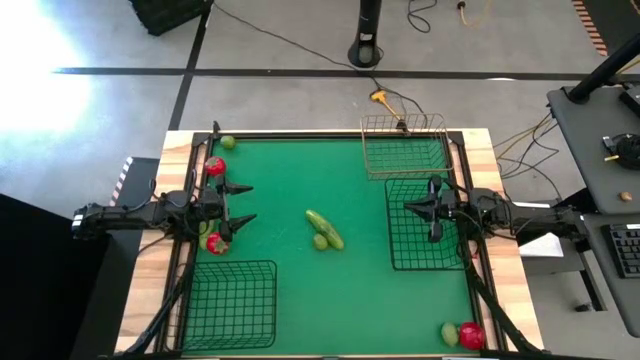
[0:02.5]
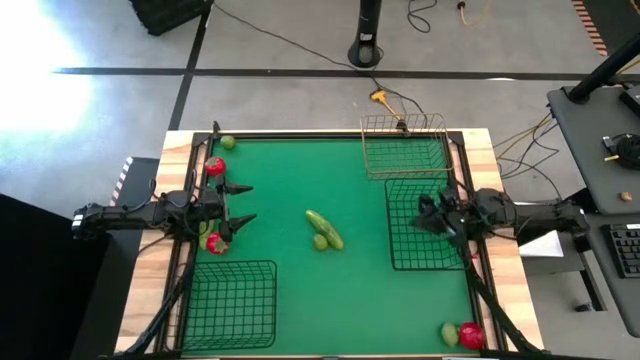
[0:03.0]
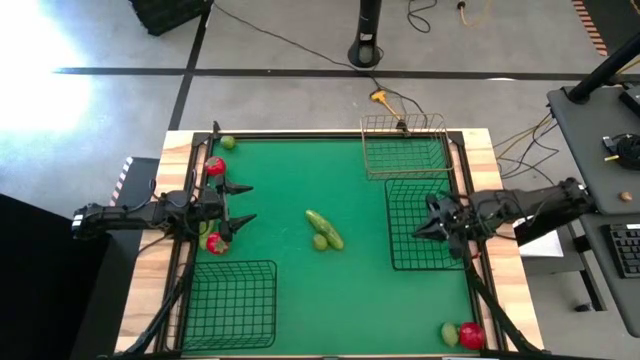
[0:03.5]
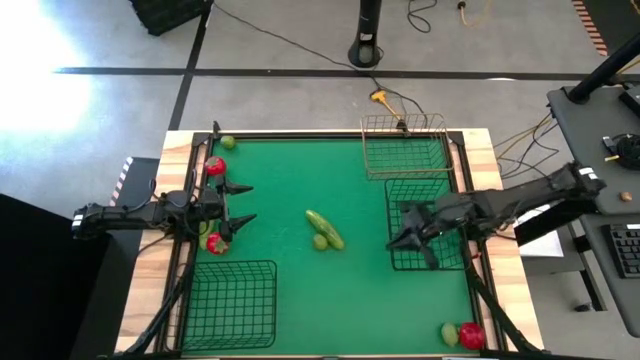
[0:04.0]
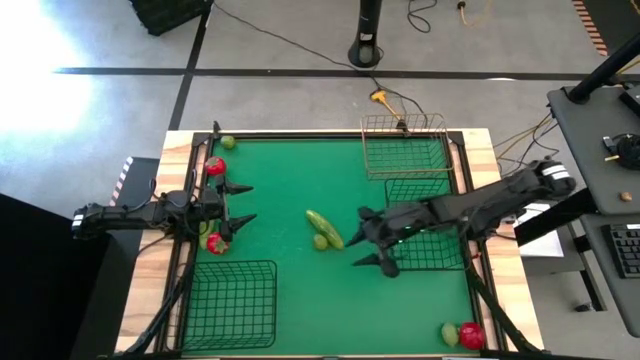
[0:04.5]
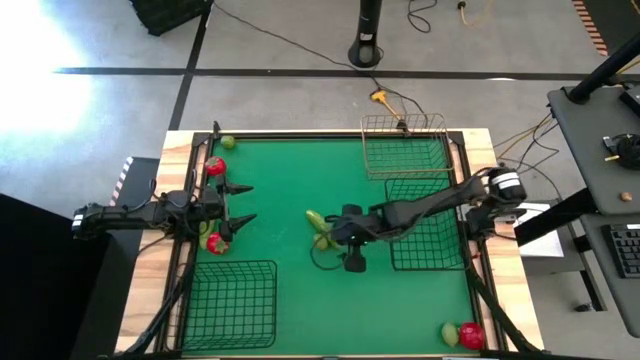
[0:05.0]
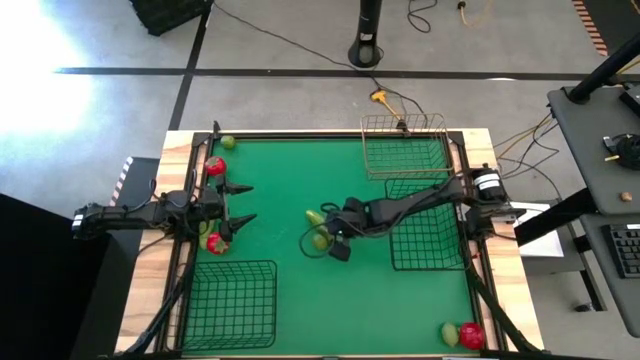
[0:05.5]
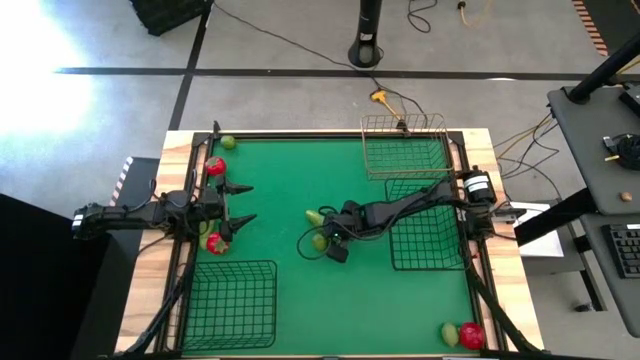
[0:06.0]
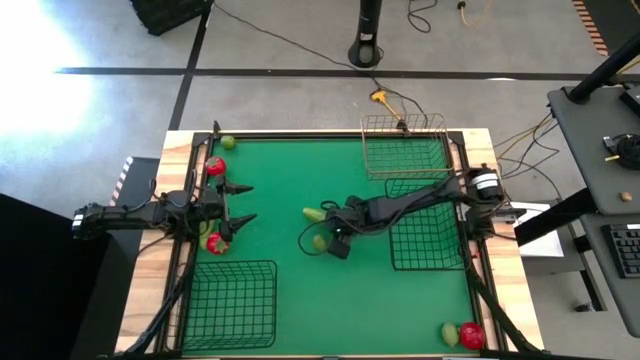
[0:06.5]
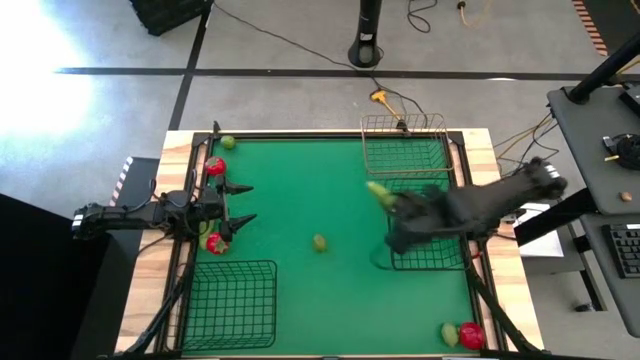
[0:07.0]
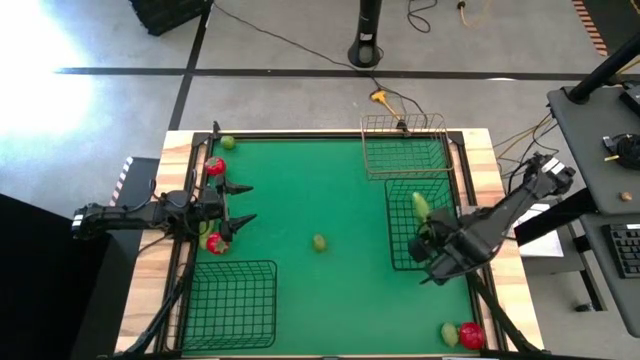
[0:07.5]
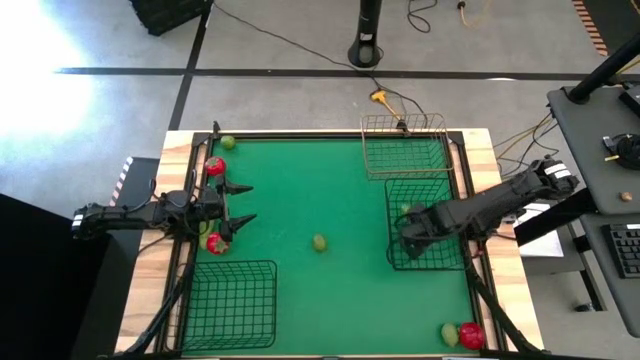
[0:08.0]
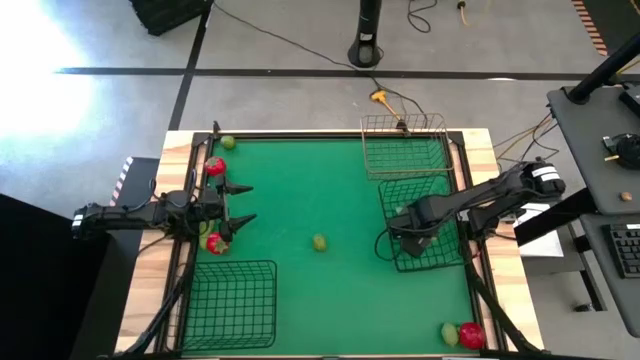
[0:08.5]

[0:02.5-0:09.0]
Task: Sort produce into baskets
Put the right cucumber into the top black wire basket

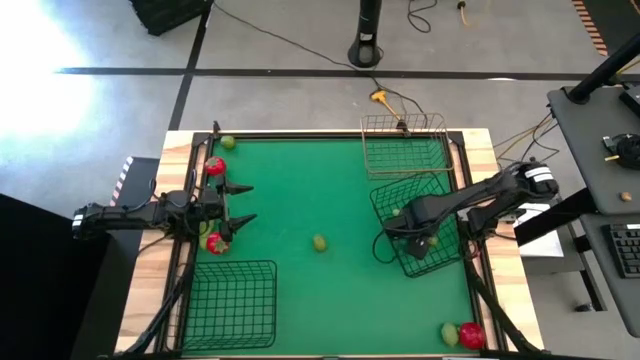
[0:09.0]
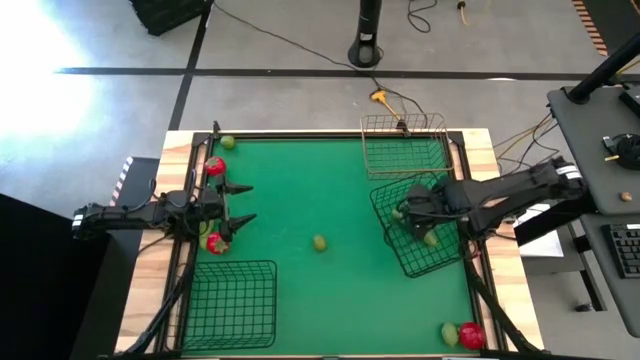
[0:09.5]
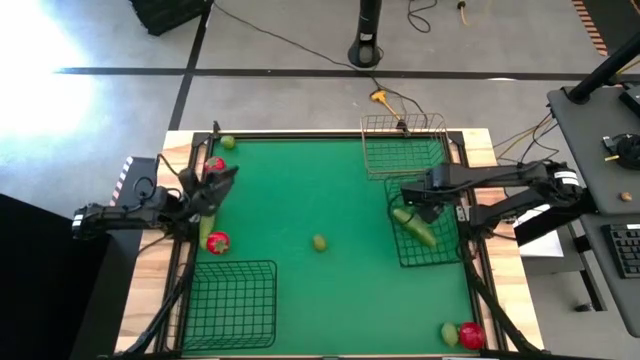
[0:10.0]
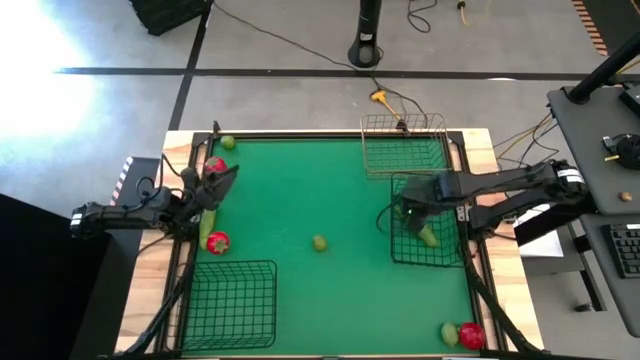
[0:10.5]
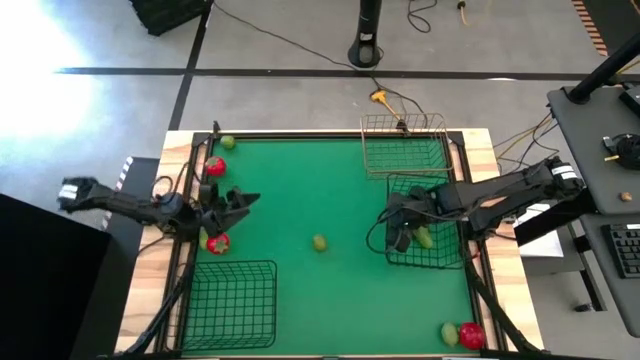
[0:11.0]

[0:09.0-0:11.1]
Adjust the top wire black wire basket

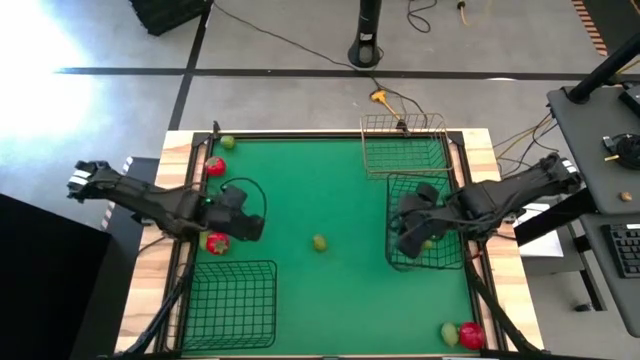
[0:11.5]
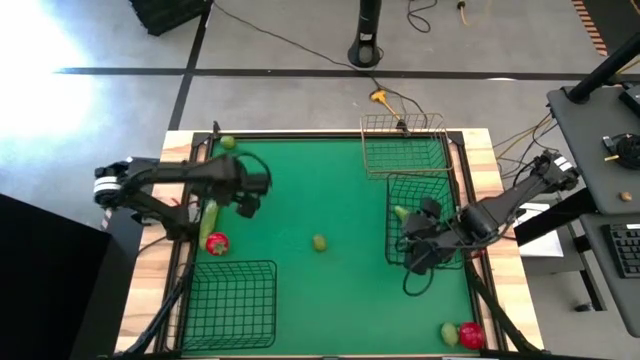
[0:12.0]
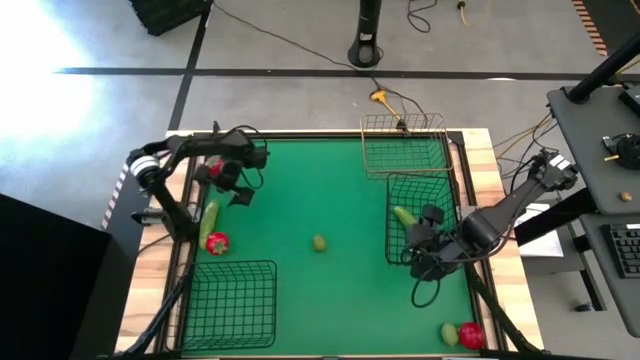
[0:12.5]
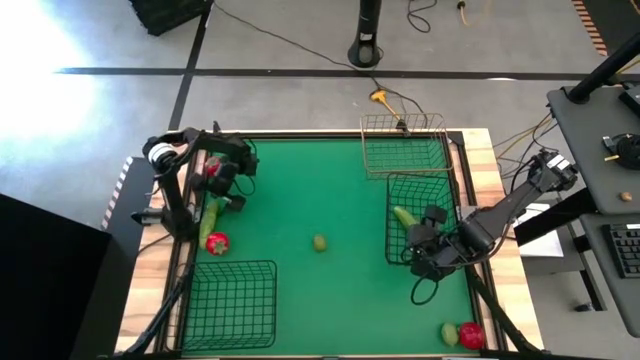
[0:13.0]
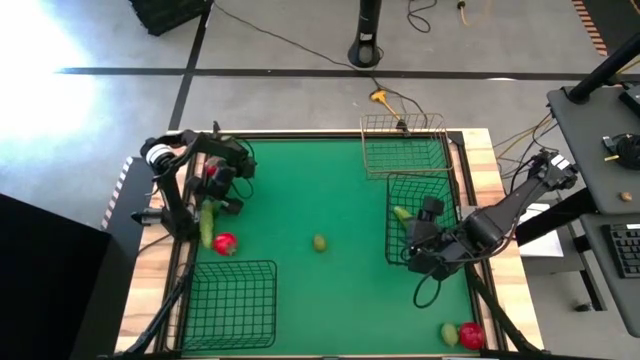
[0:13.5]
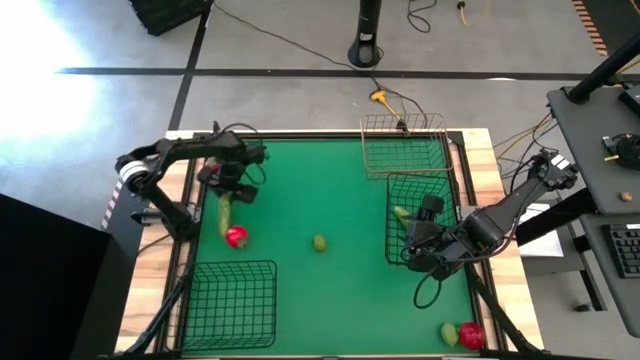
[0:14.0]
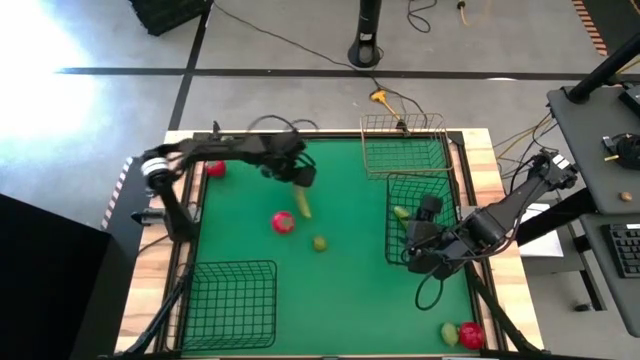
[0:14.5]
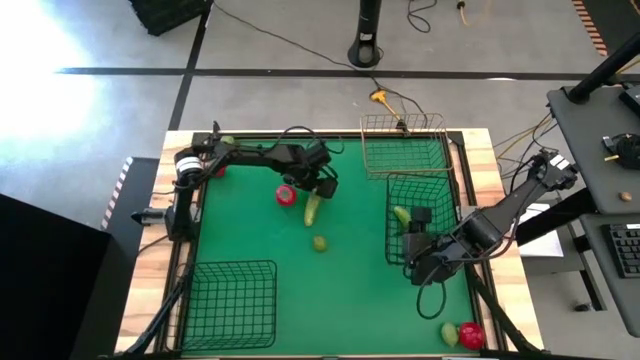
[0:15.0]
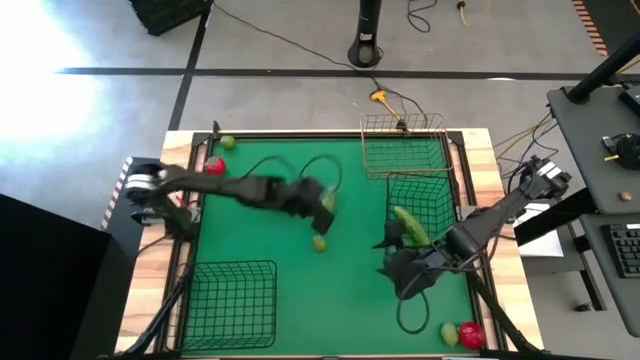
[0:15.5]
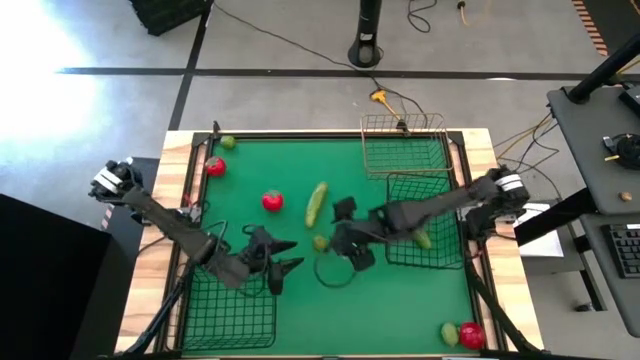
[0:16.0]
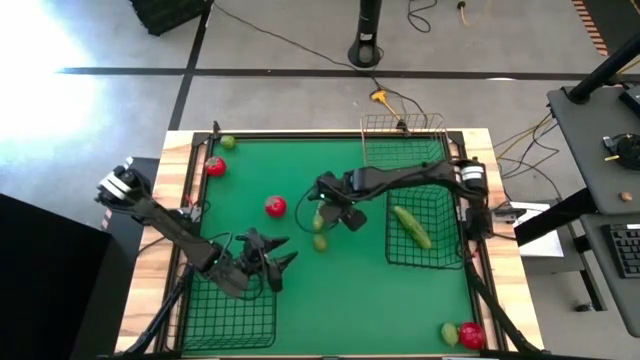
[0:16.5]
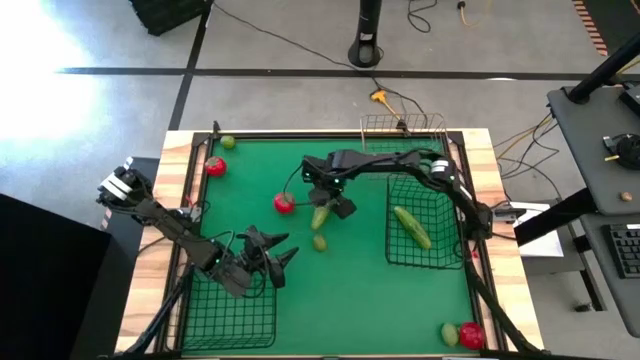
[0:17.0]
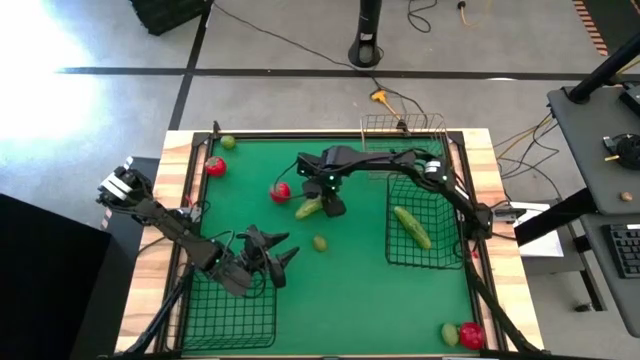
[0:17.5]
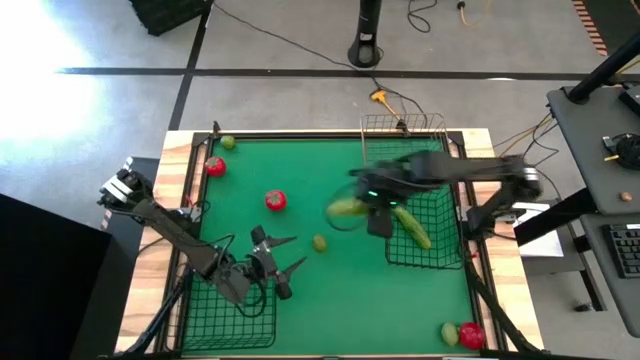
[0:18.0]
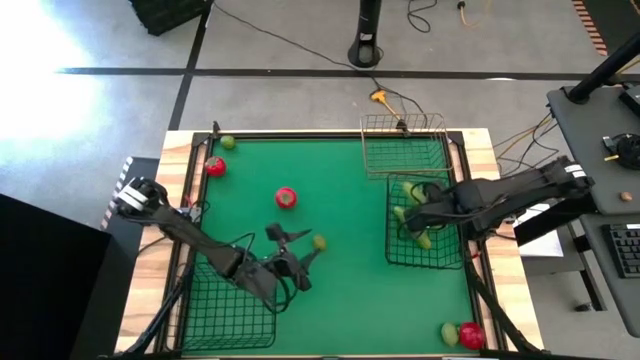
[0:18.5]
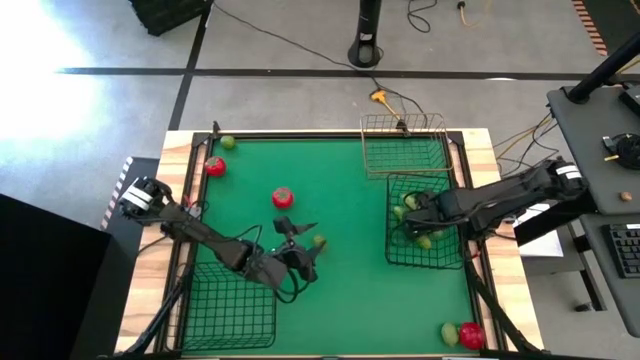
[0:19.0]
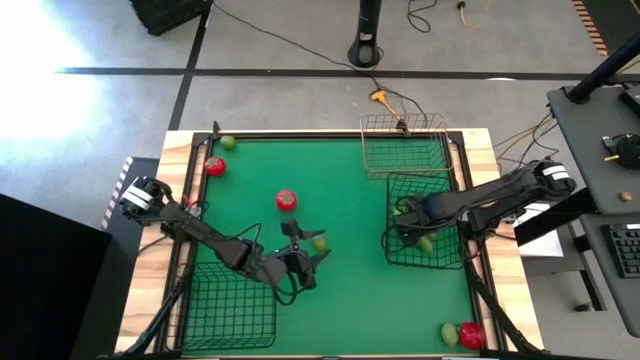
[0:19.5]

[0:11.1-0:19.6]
Put the cucumber into the top black wire basket

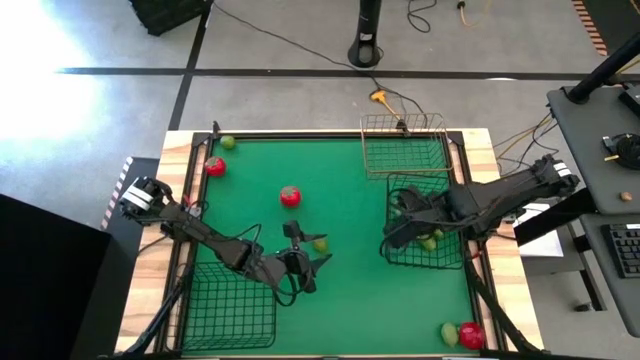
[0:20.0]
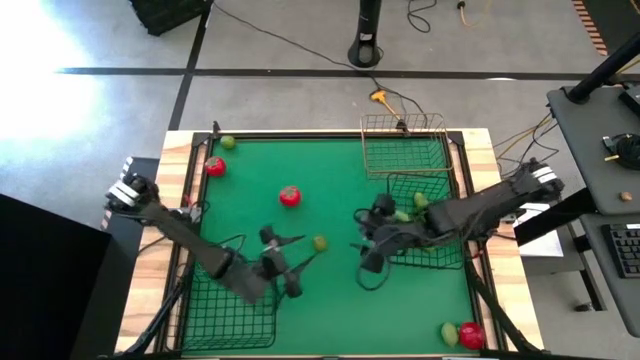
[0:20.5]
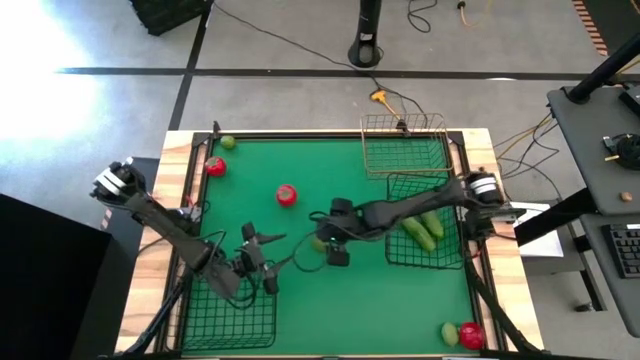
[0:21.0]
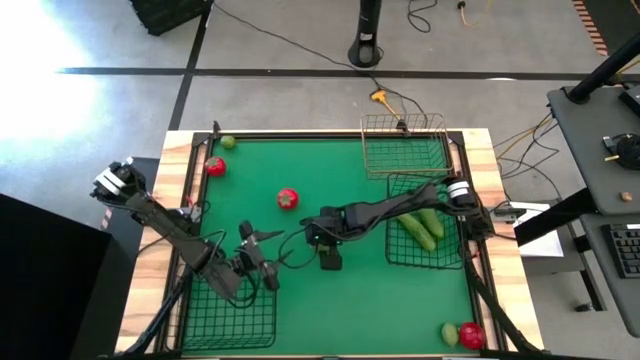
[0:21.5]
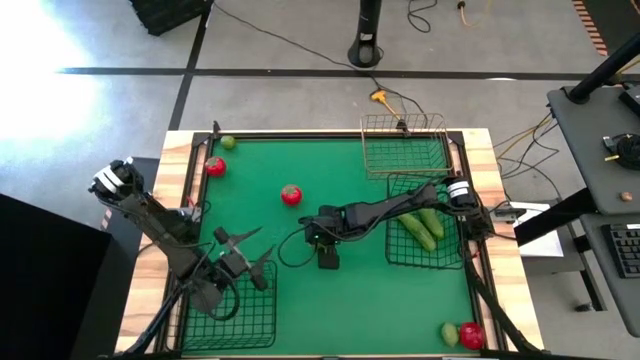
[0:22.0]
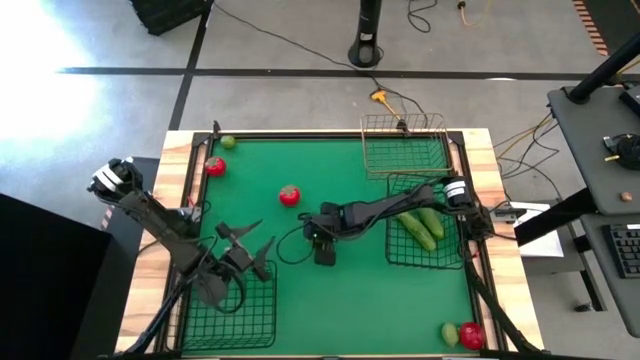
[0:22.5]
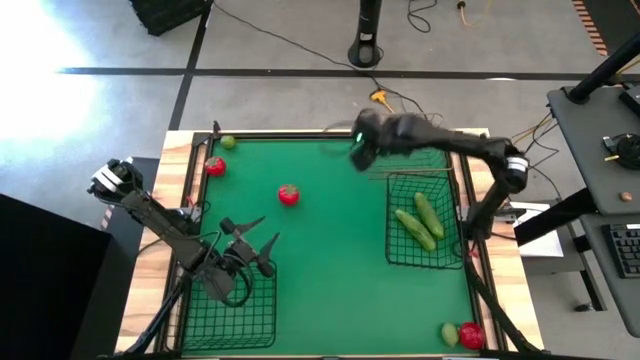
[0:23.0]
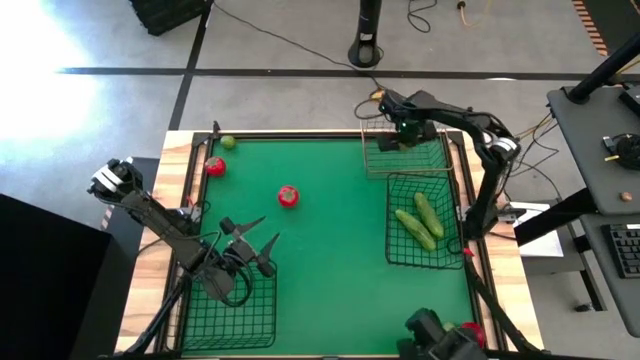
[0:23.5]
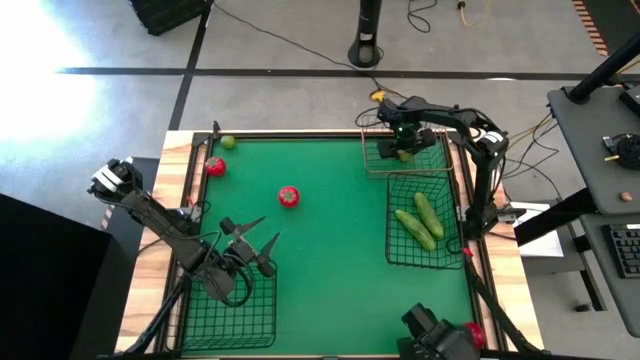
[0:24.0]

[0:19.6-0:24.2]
Put the middle lime into the gold wire basket
